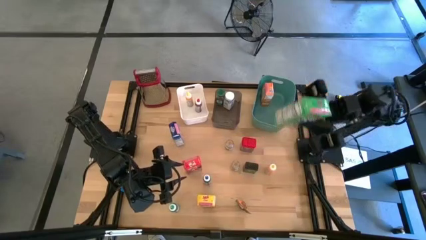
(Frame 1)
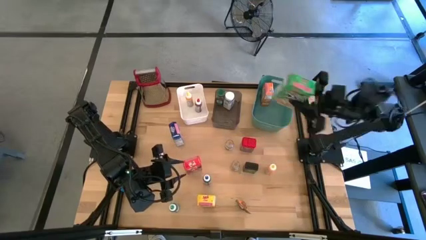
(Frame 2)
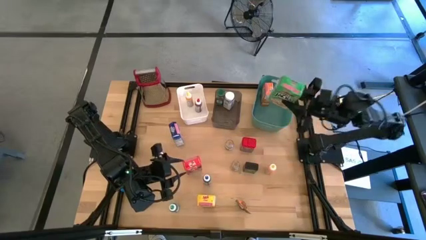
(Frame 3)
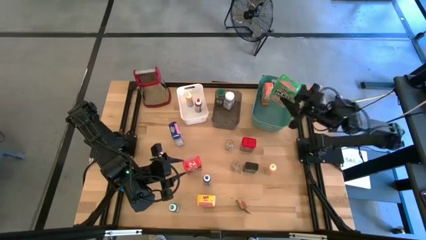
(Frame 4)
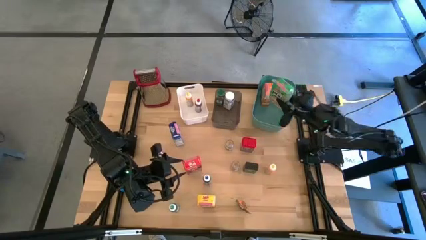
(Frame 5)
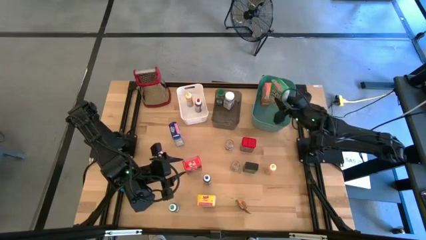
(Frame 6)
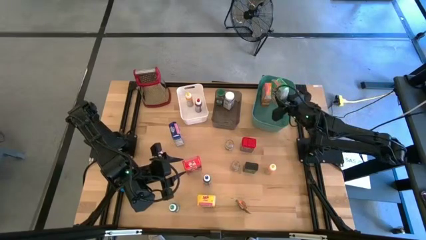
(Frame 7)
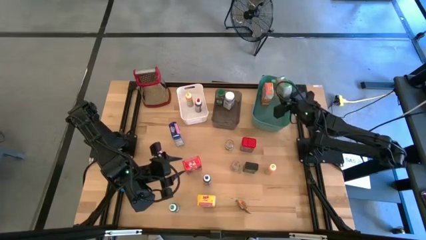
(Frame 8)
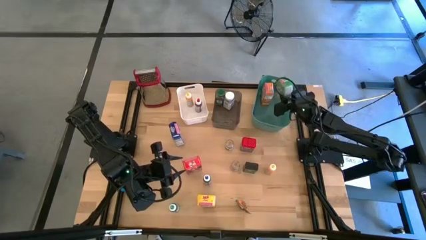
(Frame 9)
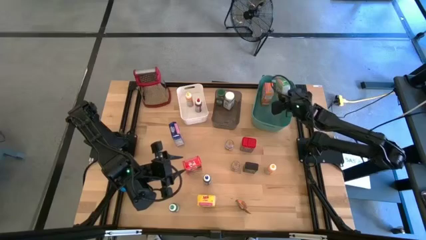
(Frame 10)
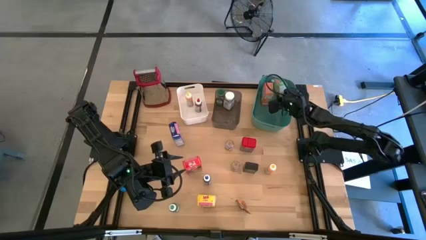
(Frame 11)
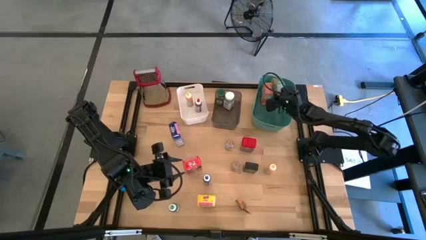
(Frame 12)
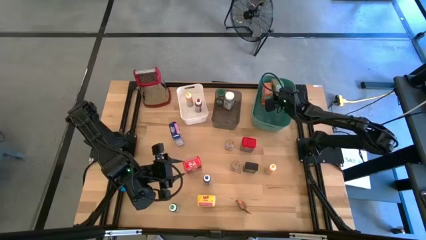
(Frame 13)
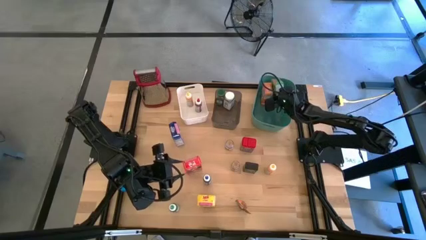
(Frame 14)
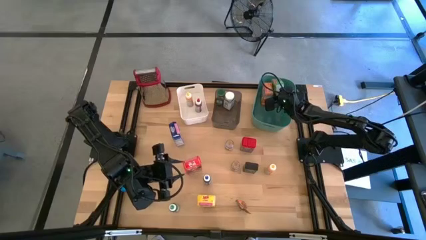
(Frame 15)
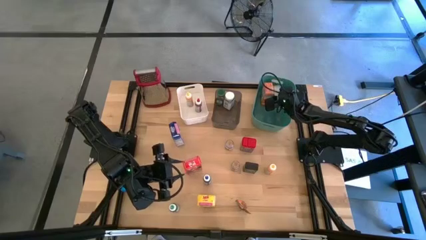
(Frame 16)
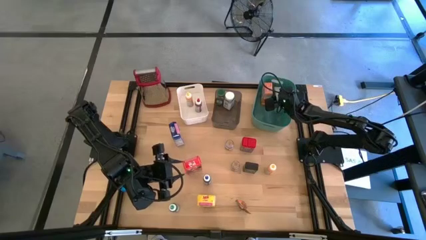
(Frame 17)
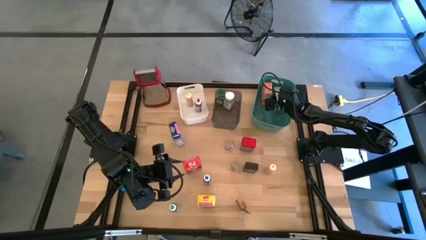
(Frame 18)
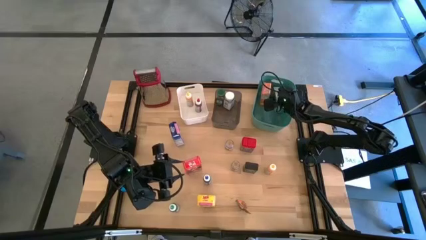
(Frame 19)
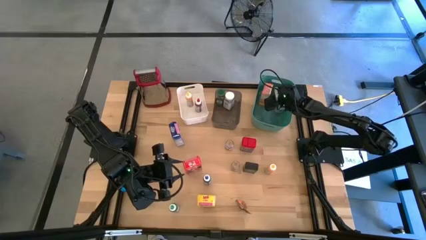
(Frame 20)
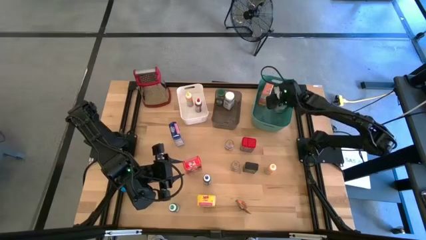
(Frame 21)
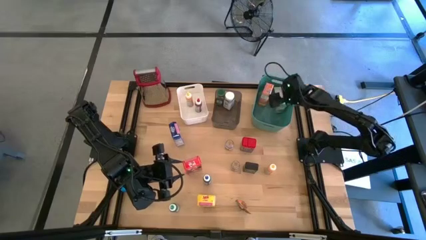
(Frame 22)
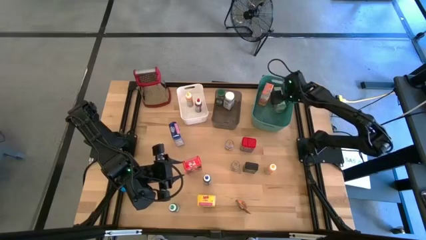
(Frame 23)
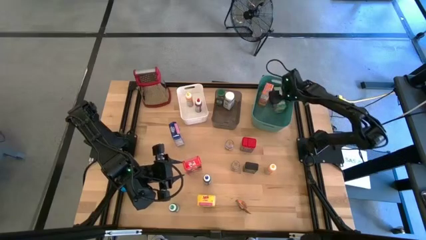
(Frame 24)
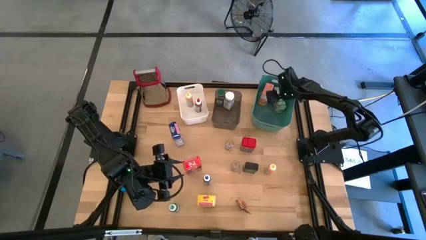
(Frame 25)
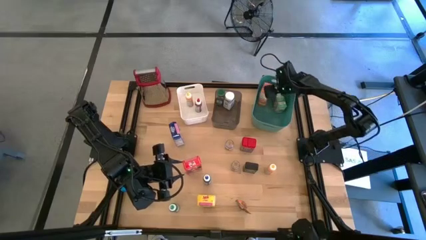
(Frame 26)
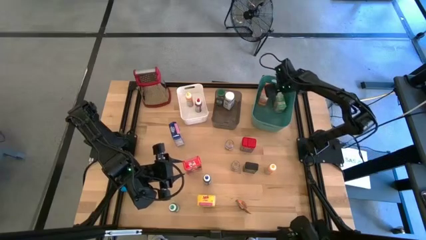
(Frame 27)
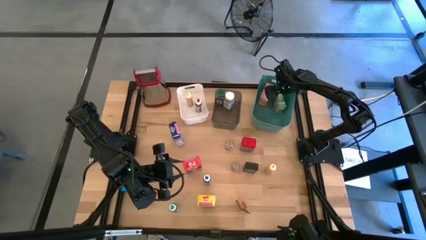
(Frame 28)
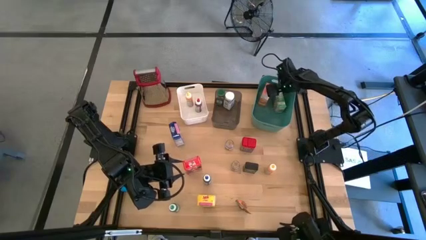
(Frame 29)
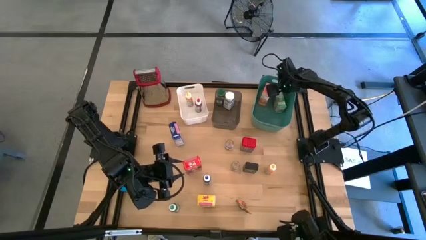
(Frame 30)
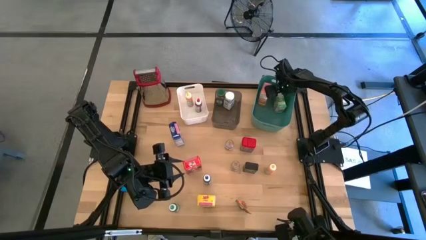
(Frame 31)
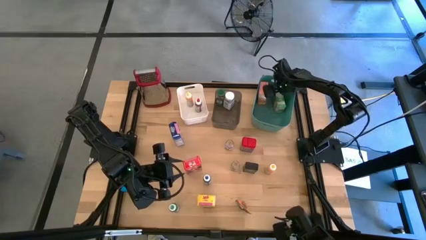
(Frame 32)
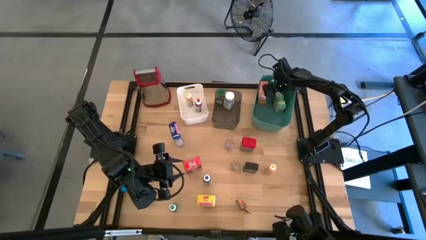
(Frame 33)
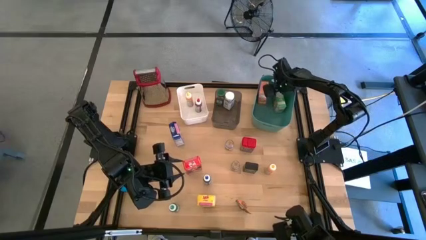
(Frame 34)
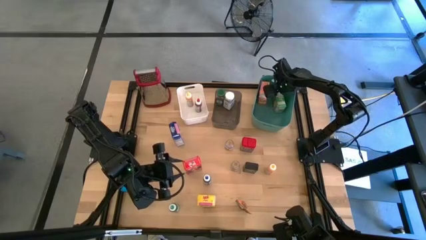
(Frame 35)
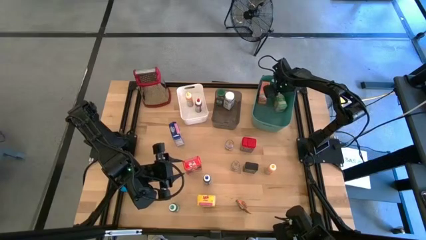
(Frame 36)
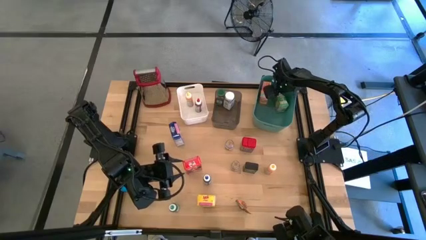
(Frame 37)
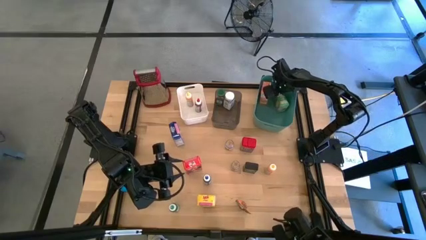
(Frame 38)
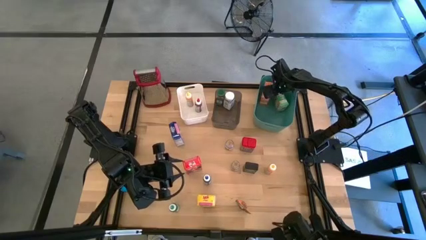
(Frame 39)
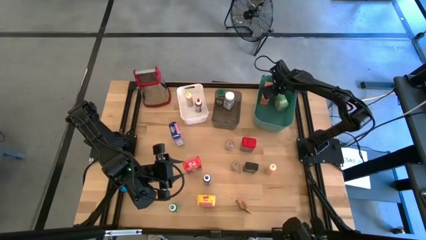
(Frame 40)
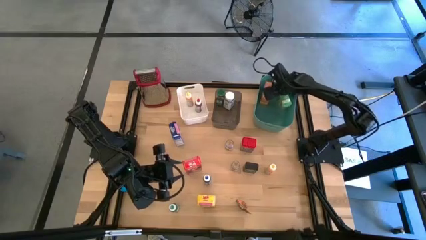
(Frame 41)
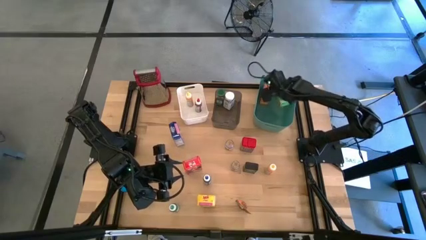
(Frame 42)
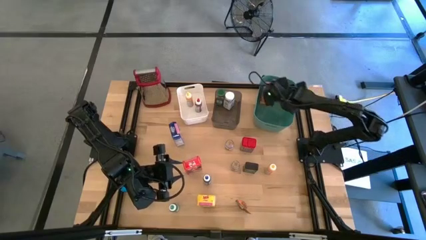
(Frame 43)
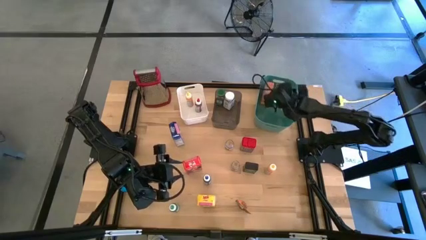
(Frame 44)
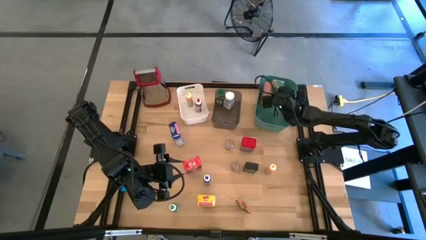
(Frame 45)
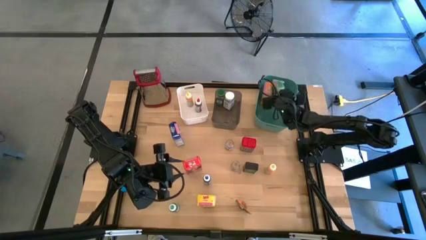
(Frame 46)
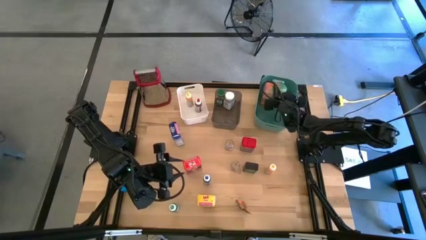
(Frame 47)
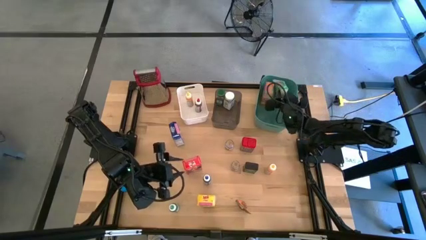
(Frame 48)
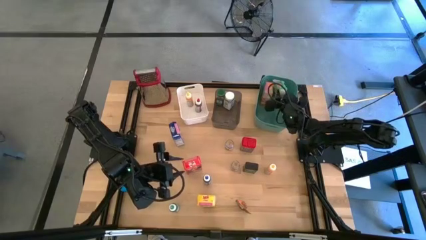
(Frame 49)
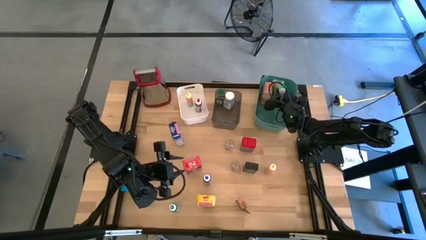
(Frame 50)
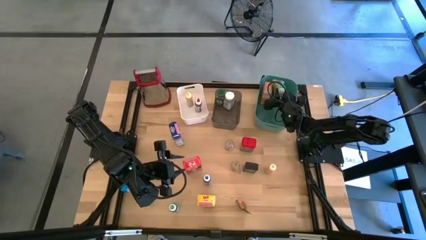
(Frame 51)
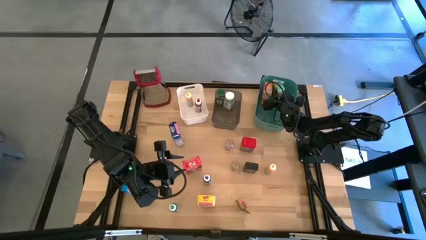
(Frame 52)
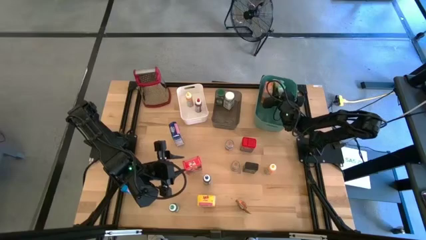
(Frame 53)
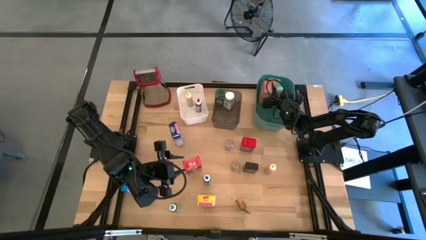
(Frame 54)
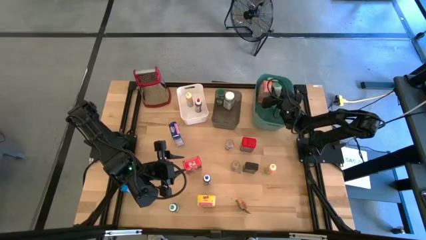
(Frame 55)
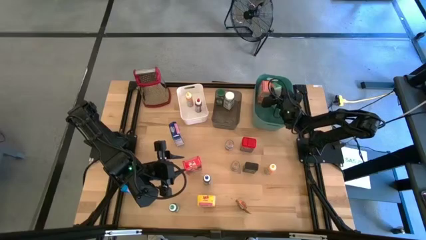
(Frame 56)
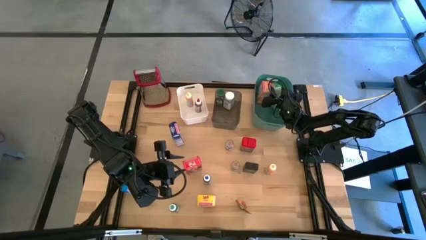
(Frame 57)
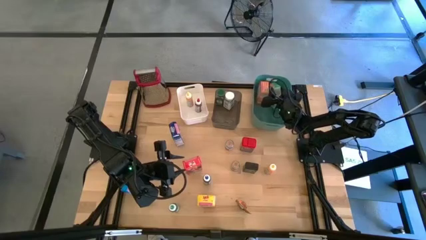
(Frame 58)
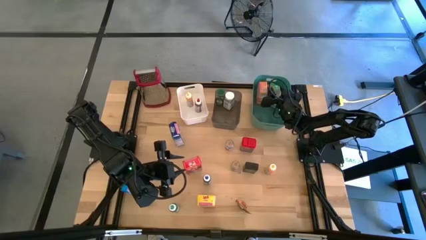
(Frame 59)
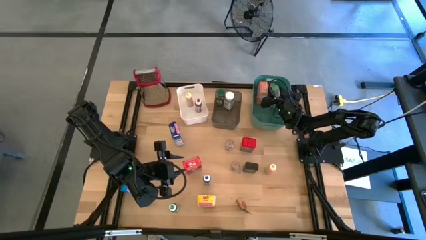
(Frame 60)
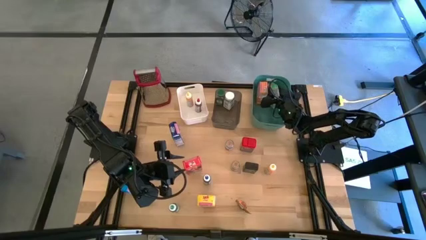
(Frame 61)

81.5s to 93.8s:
Task: Pick & Place Kitchen Items
Put the green cereal box into the green bin

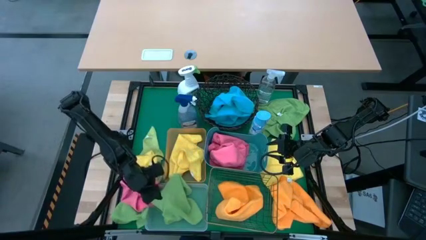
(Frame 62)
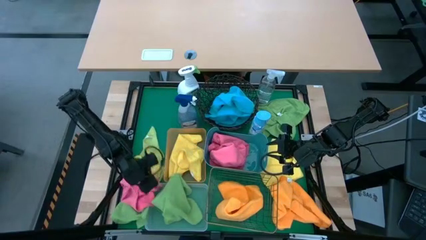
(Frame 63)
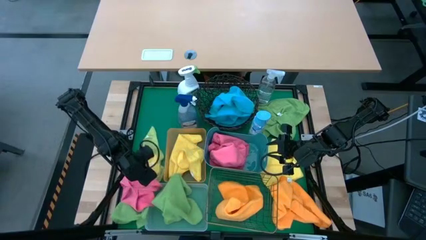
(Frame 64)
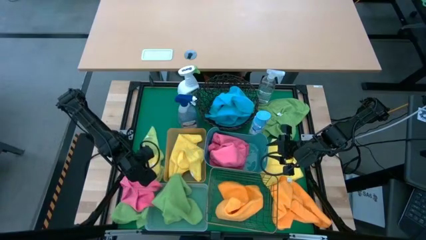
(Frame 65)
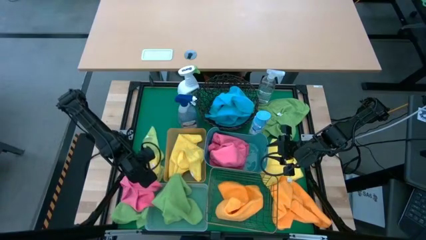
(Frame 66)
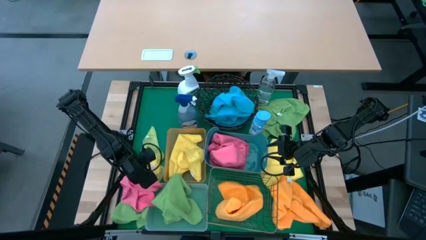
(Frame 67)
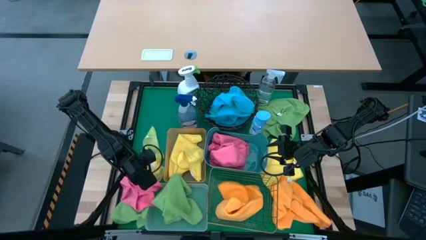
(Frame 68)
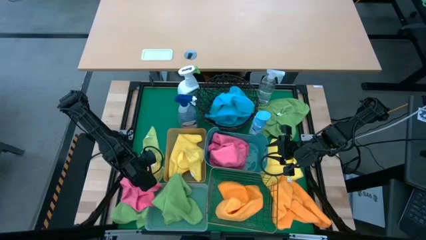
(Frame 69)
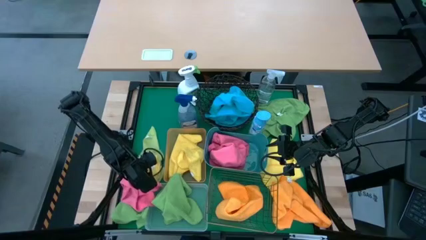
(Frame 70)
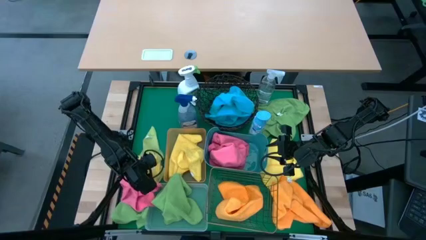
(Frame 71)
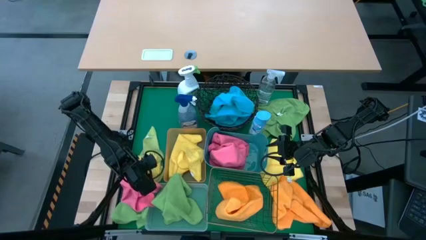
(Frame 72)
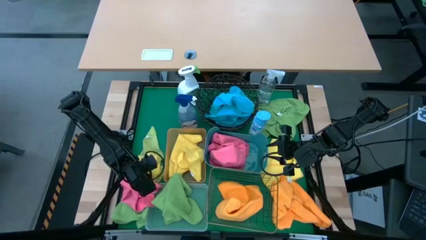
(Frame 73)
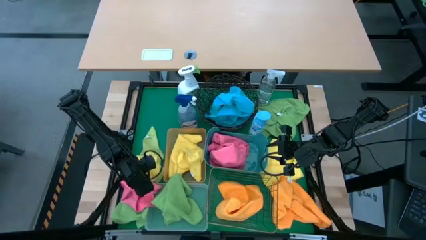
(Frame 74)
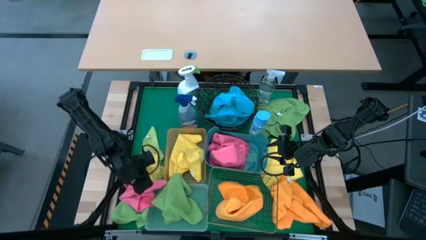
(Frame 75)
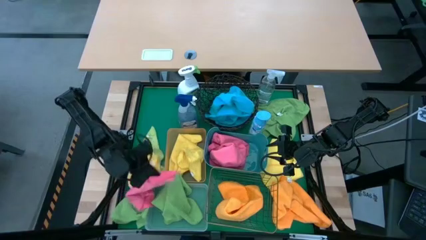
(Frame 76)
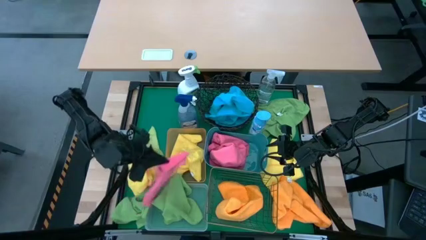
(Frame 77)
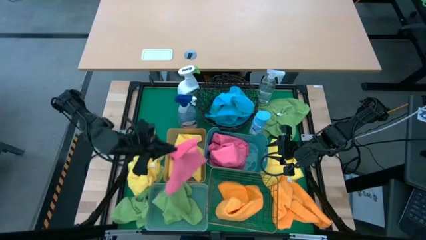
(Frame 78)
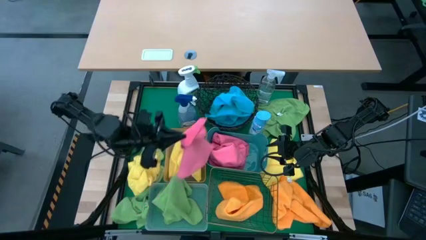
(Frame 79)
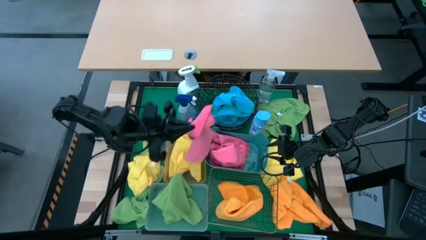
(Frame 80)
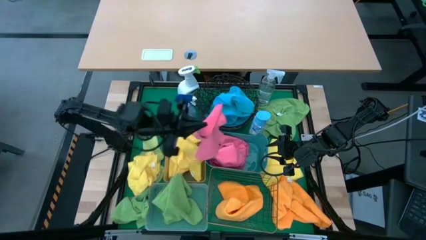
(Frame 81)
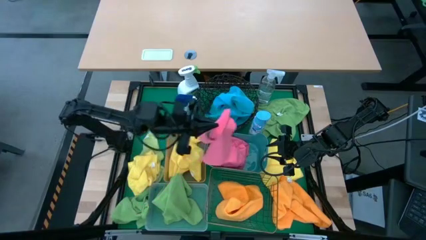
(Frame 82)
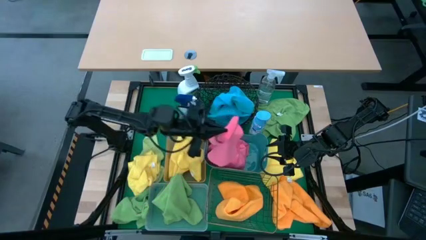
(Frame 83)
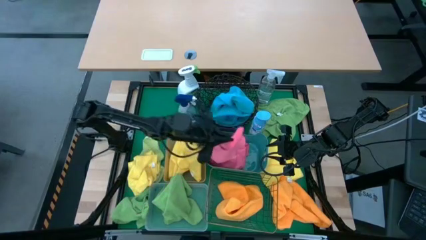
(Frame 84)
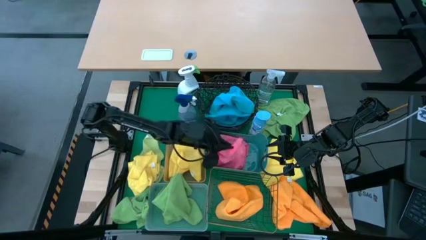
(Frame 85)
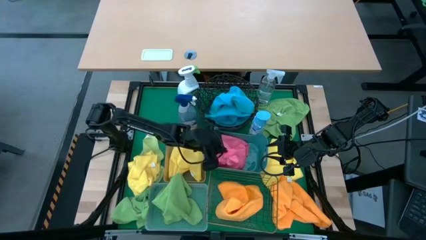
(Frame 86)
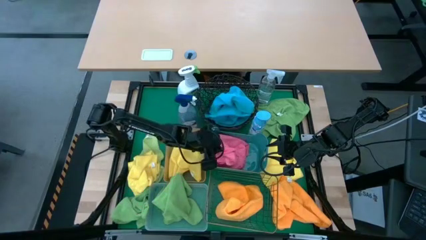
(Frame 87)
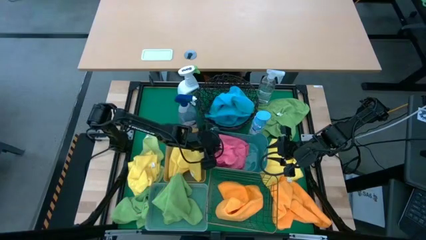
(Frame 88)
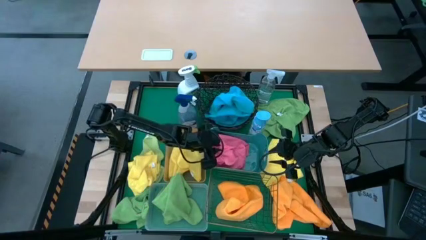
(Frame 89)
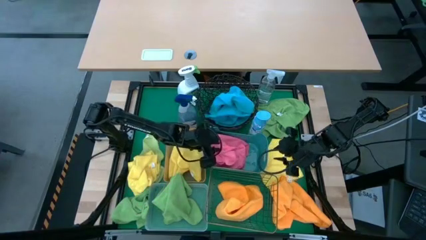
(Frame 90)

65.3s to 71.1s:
Task: Sort microfiber towel by color & place in baskets
Put the pink towel into the blue bin
